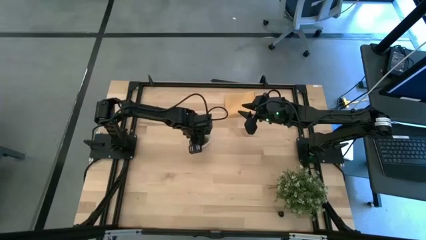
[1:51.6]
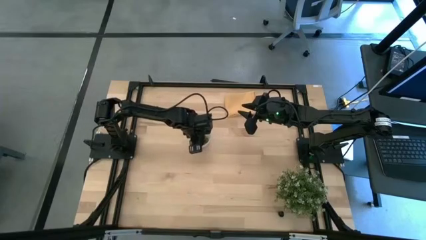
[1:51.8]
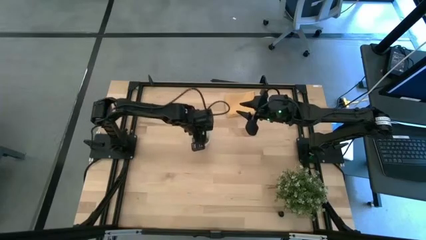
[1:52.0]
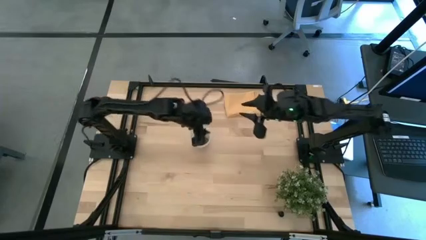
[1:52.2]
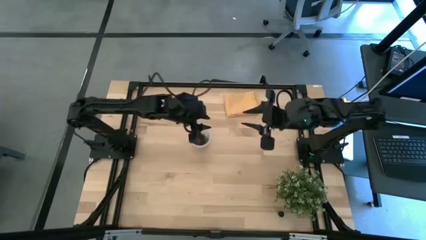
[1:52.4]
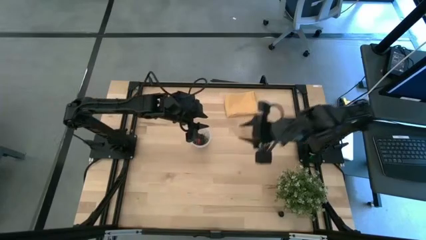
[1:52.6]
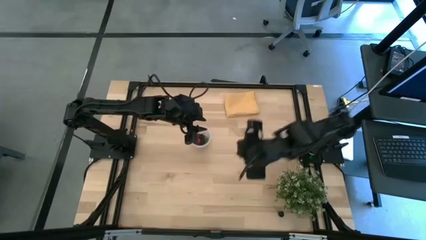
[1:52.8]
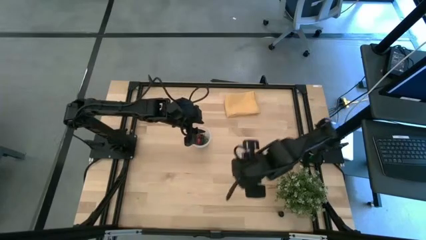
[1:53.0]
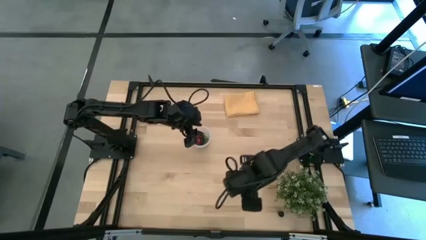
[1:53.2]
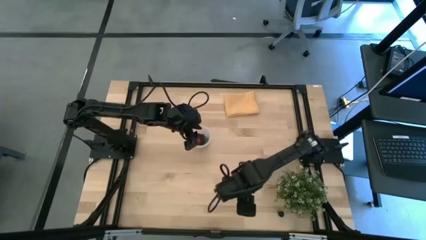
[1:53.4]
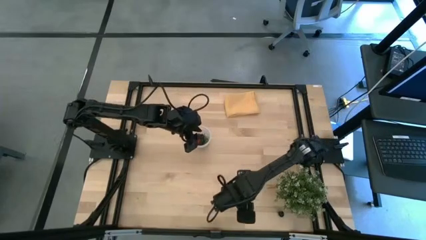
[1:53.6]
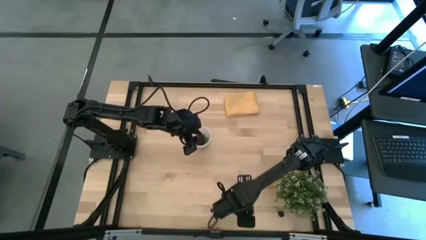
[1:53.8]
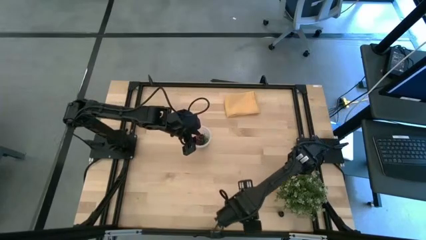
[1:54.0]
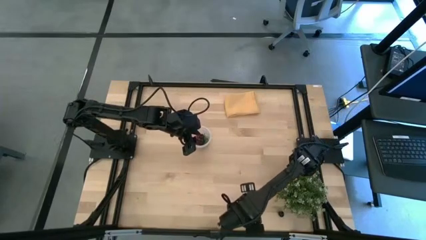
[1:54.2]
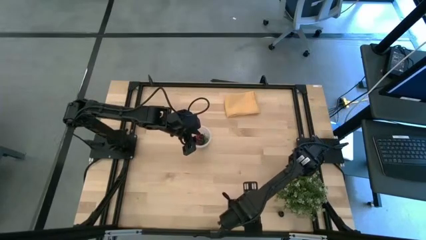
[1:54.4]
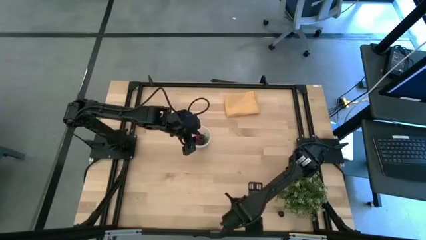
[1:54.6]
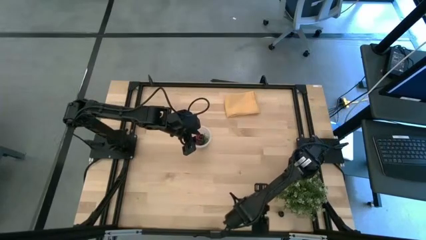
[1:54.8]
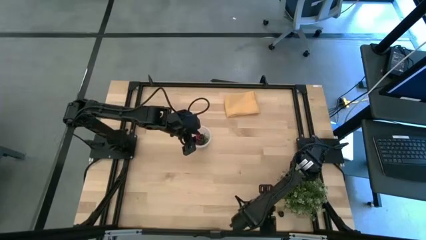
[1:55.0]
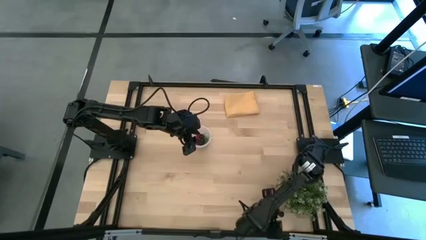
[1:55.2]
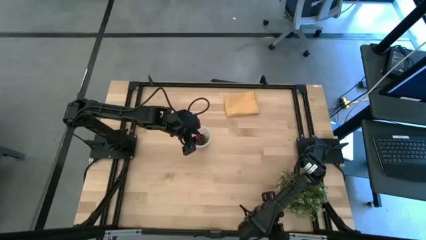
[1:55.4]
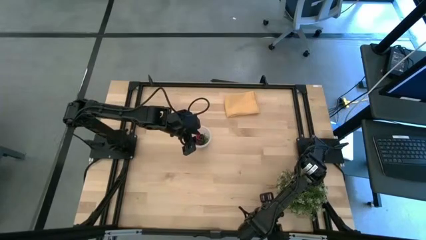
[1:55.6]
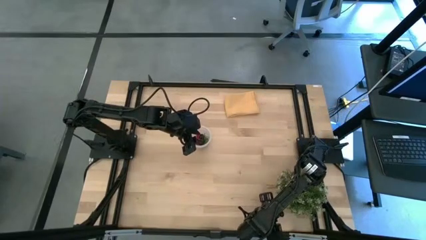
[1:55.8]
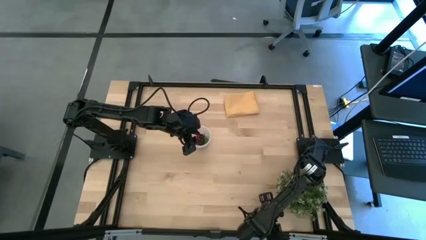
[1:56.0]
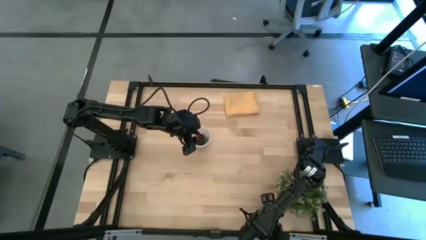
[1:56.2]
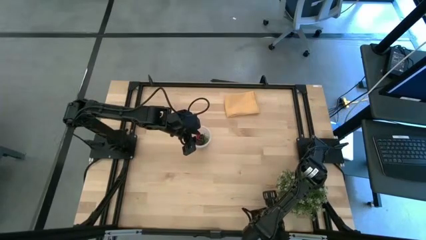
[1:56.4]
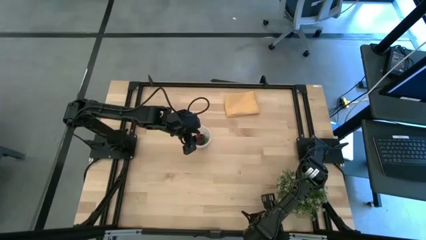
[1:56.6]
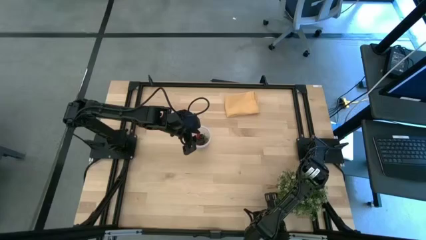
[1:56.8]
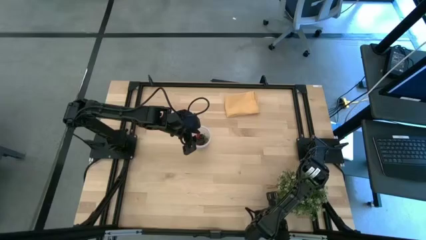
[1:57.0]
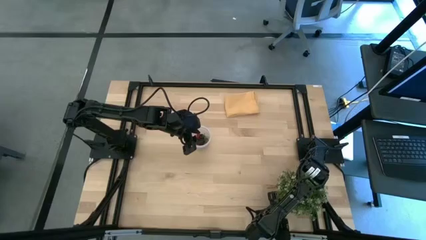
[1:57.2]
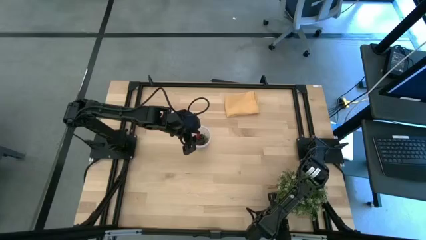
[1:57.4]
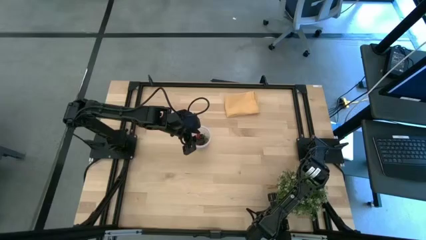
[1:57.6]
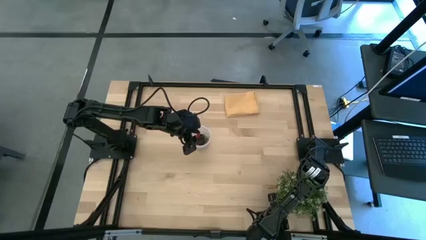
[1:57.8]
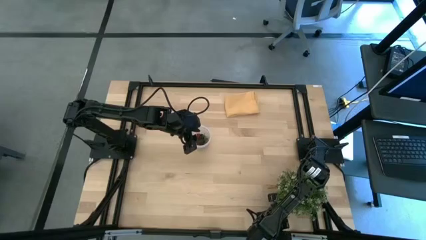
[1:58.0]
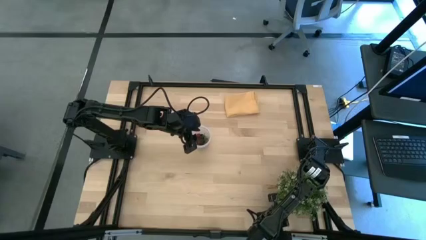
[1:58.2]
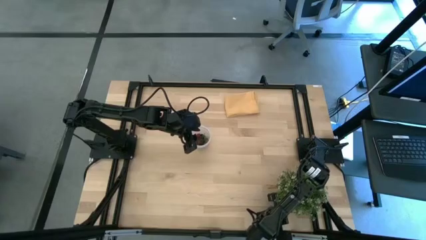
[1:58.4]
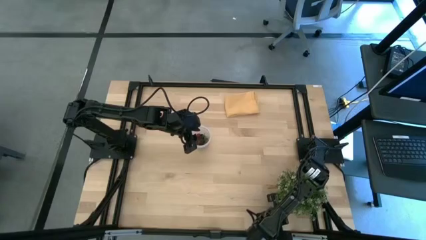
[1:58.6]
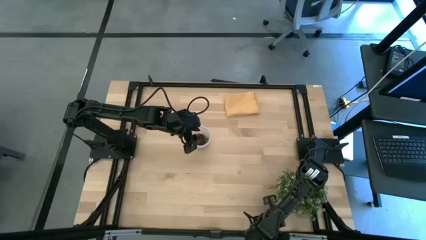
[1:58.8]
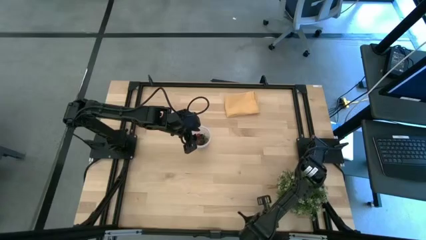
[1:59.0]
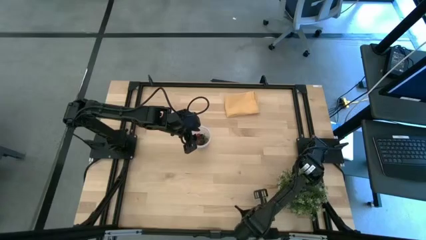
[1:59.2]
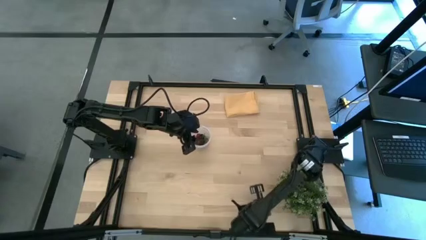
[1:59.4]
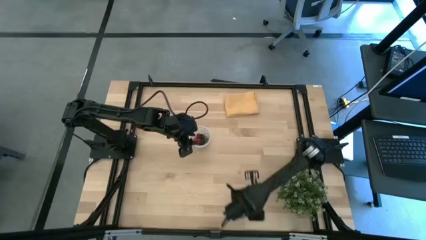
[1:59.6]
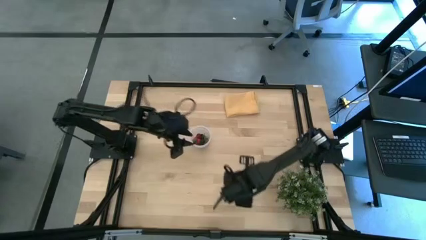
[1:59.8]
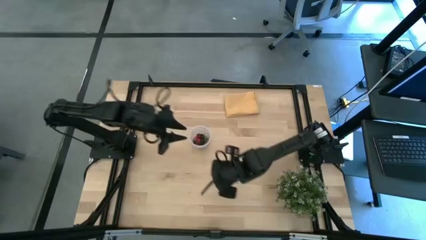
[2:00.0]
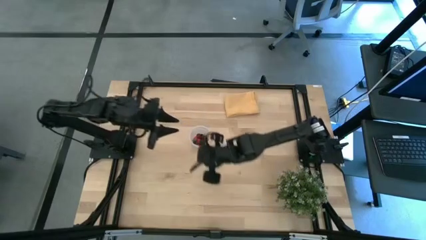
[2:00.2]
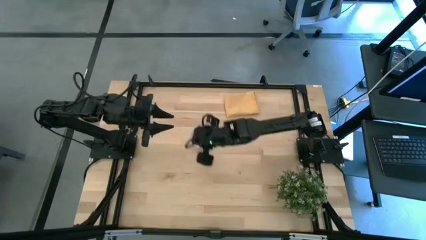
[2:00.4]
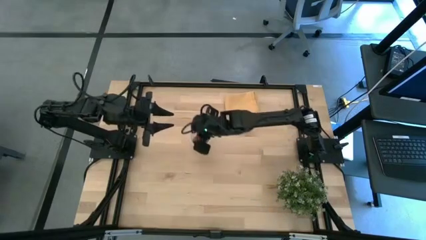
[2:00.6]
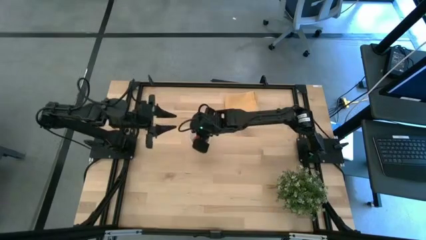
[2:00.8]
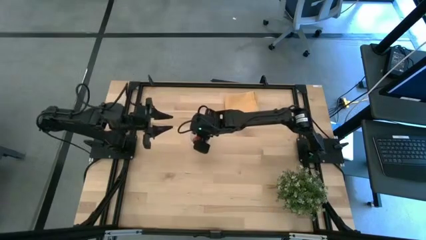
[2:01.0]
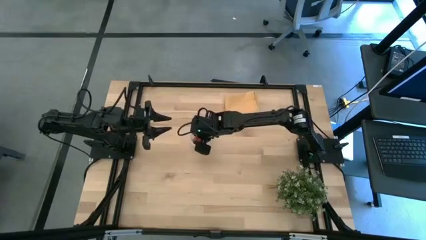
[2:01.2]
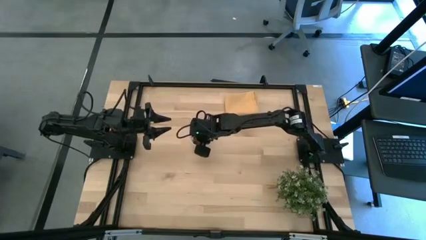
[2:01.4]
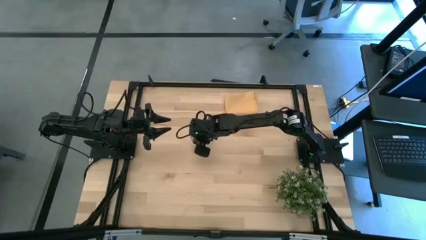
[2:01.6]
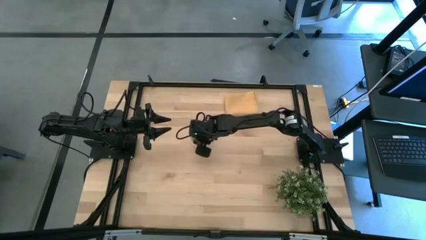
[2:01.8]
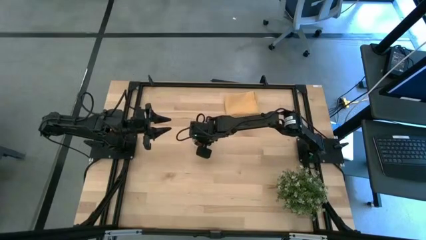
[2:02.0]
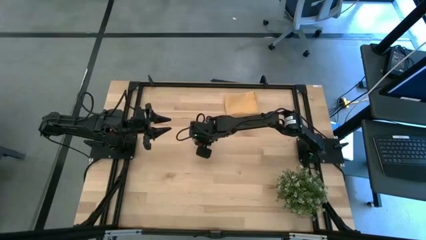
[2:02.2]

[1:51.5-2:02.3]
Task: Pick and placing Produce into tupperware
Put the black cherry into the transparent container

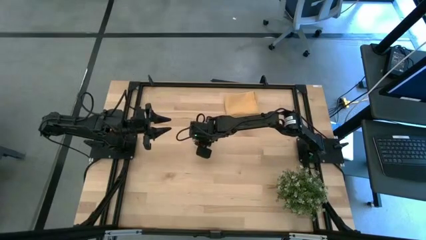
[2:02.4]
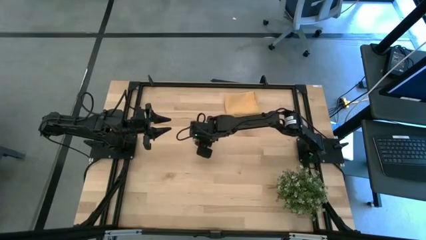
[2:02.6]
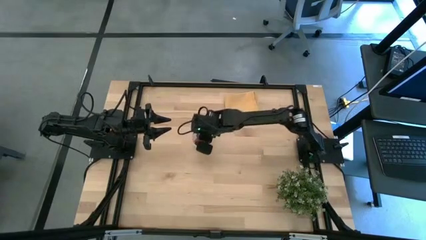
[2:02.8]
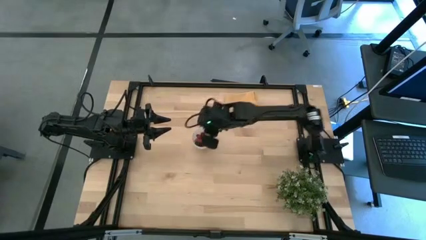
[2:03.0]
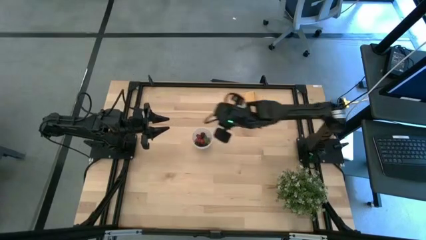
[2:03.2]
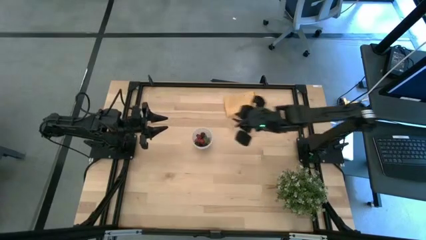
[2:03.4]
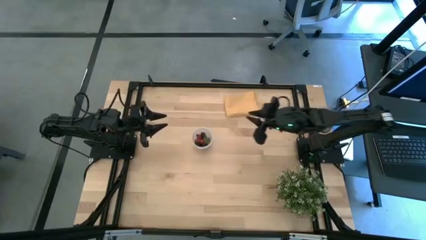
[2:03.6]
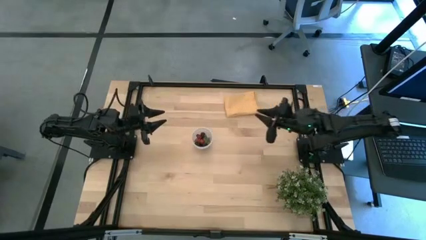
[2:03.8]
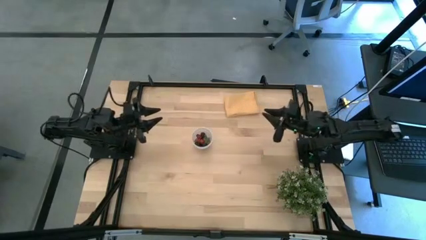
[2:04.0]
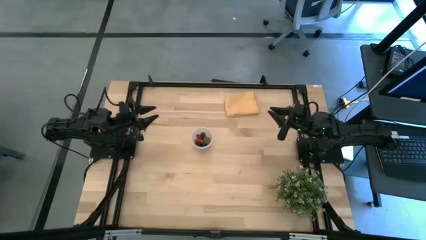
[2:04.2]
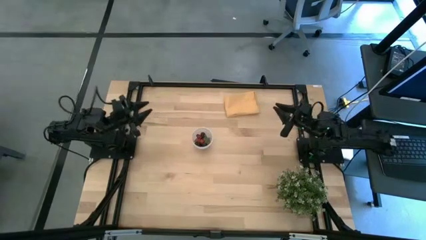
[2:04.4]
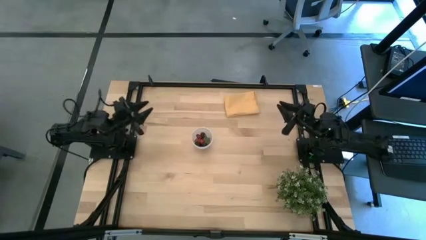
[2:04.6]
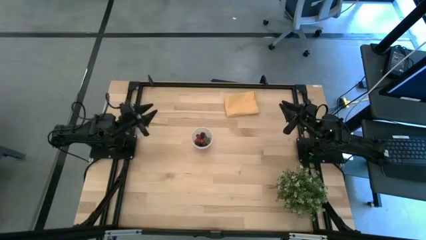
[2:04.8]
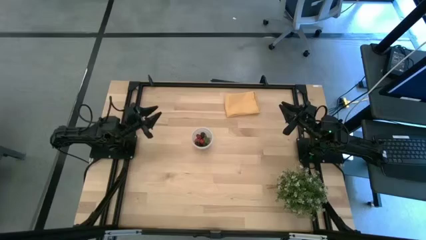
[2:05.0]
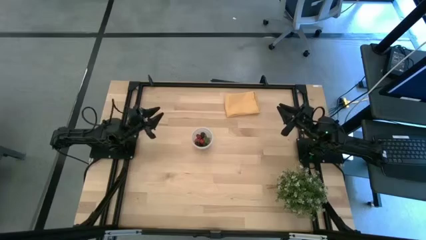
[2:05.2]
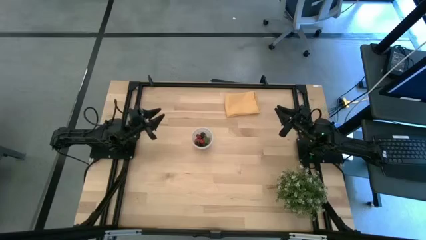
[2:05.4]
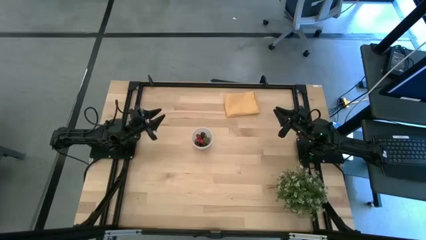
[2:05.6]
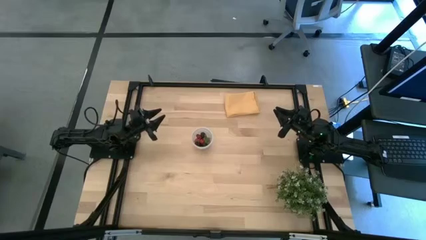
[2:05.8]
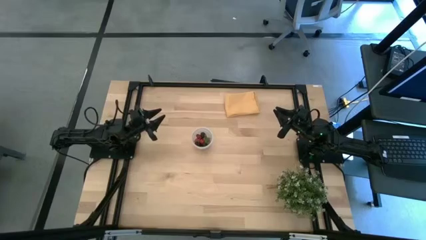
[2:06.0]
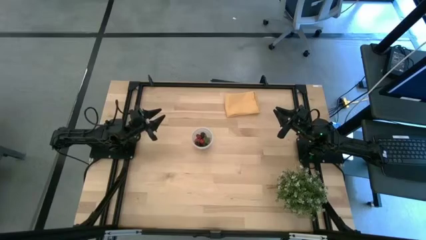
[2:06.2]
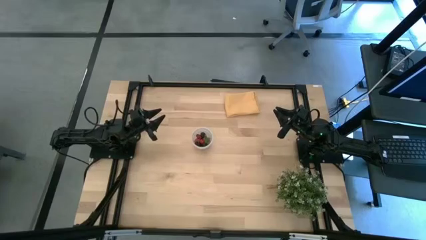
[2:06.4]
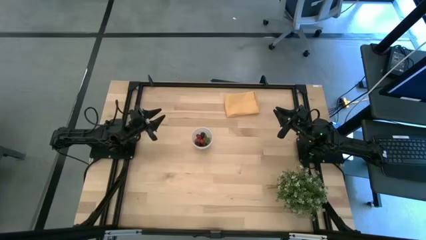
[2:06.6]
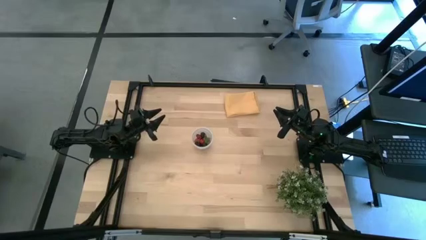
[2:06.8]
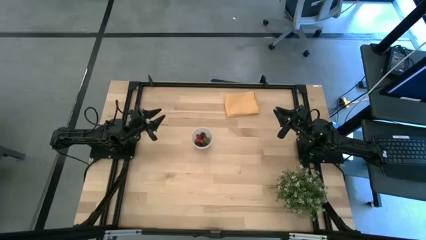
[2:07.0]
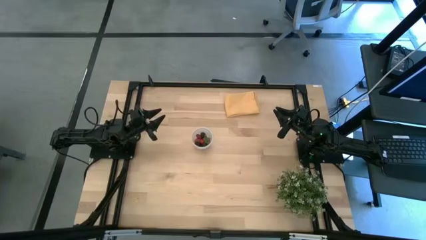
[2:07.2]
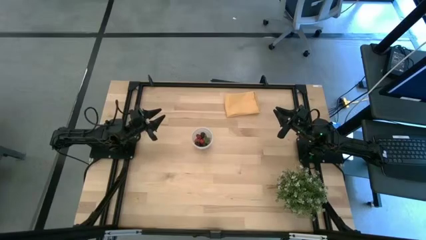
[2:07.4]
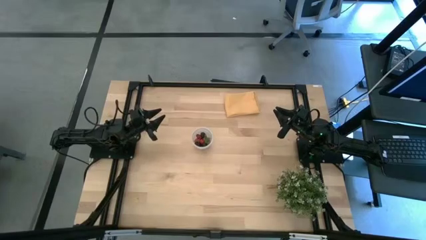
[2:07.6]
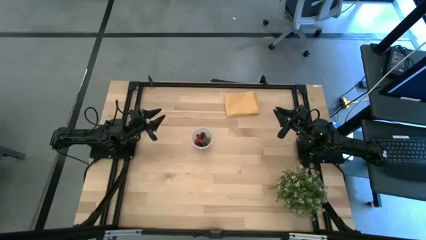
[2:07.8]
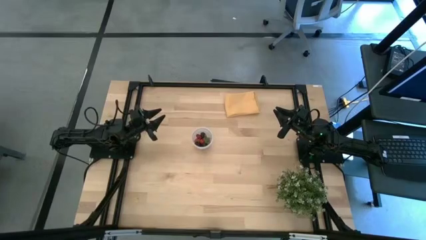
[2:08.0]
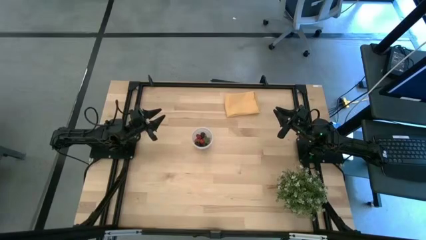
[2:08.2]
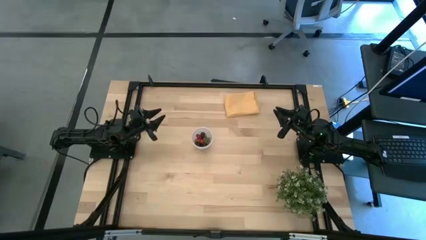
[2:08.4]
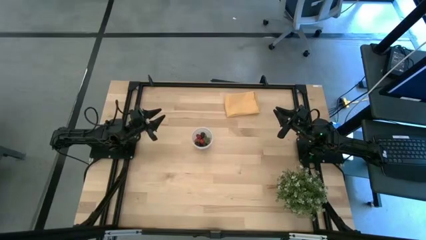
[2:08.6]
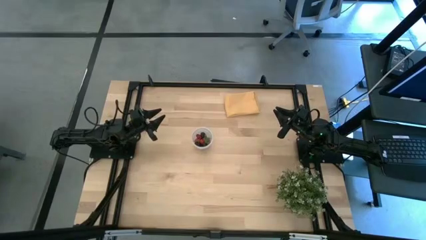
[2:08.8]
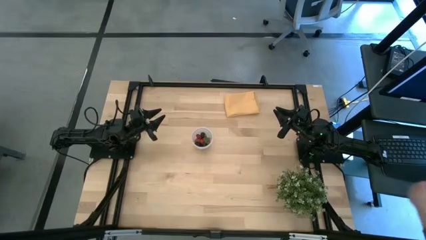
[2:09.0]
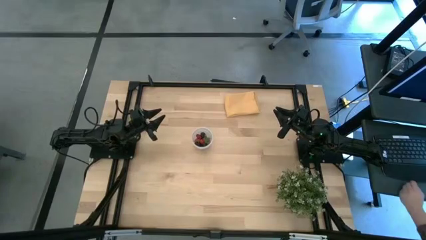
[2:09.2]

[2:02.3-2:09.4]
Return to Home Position
